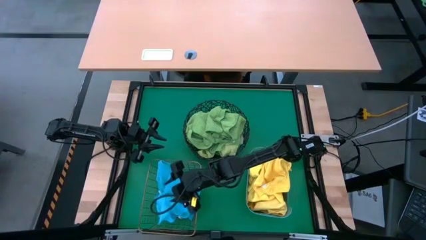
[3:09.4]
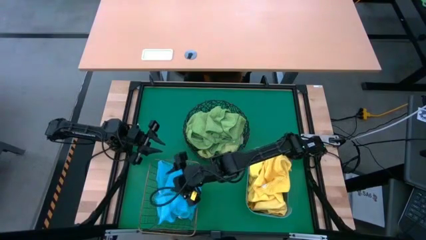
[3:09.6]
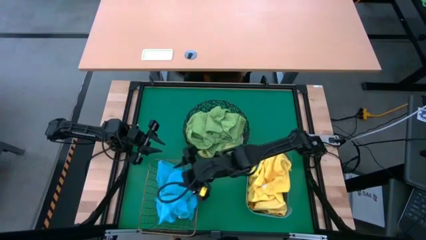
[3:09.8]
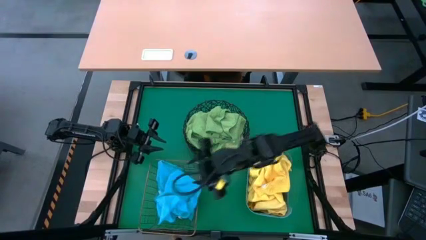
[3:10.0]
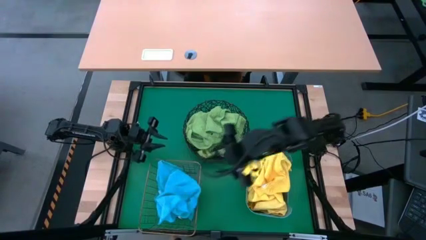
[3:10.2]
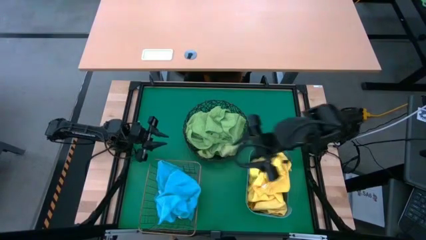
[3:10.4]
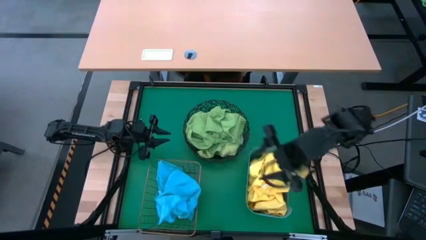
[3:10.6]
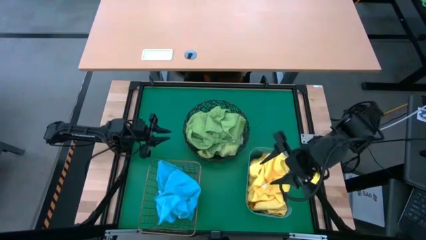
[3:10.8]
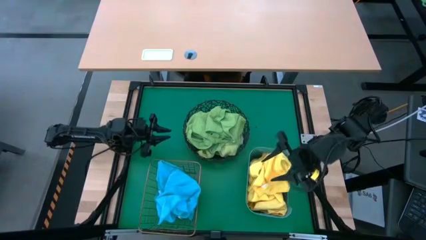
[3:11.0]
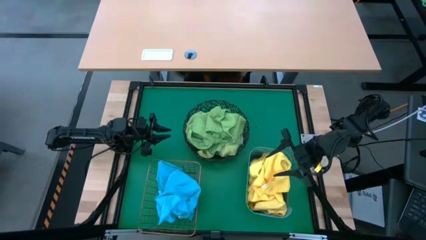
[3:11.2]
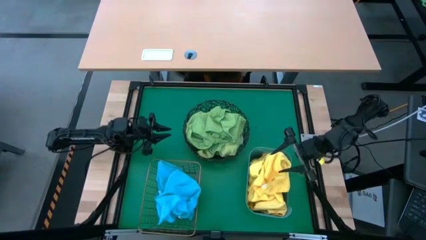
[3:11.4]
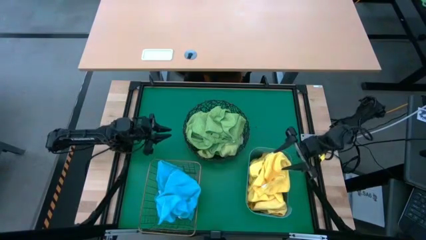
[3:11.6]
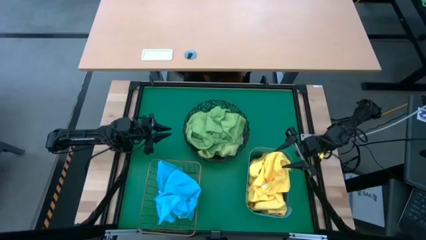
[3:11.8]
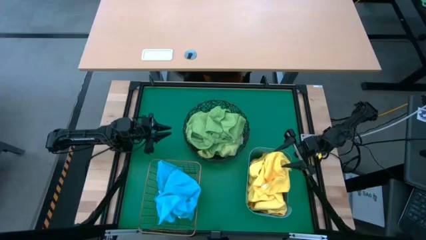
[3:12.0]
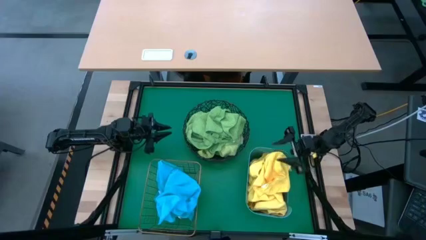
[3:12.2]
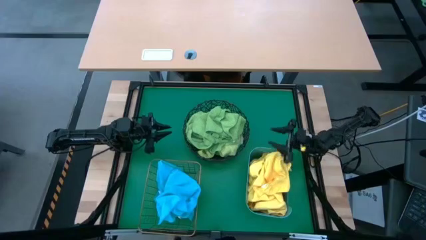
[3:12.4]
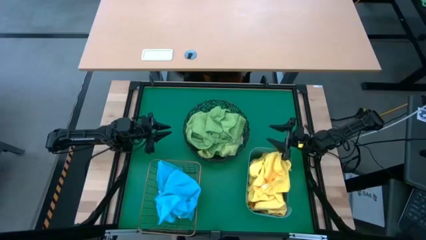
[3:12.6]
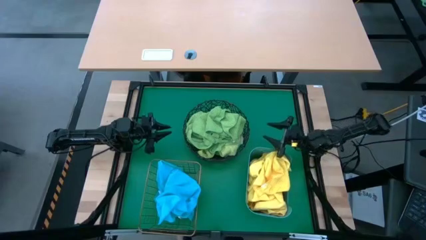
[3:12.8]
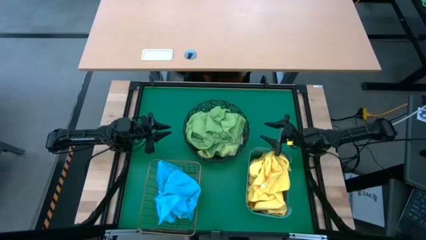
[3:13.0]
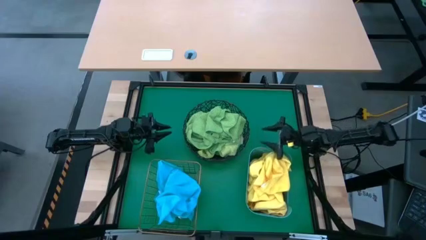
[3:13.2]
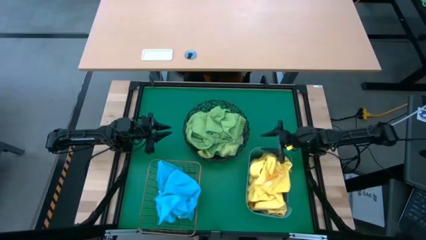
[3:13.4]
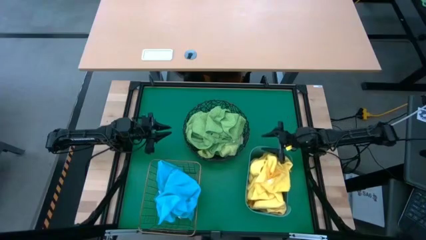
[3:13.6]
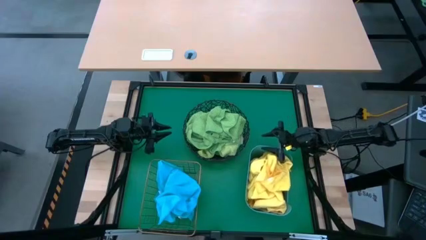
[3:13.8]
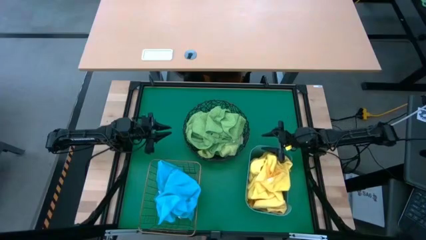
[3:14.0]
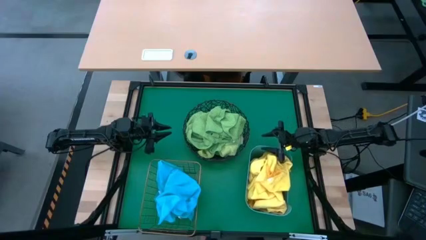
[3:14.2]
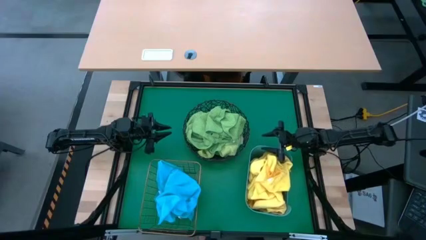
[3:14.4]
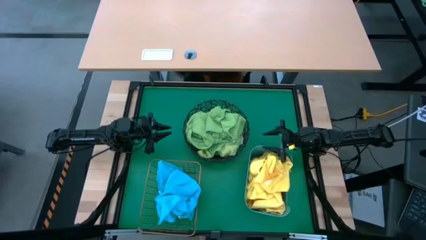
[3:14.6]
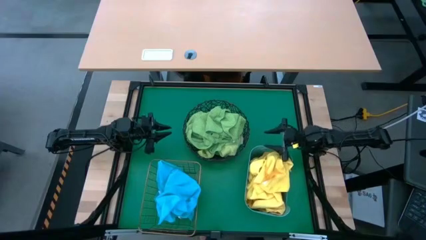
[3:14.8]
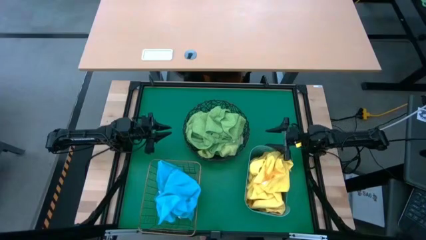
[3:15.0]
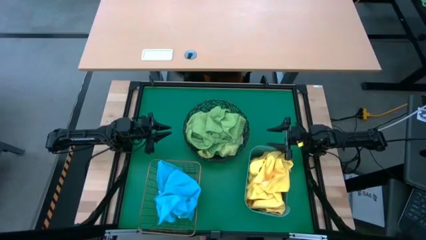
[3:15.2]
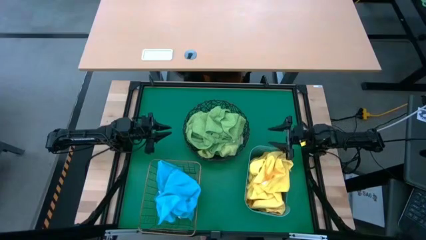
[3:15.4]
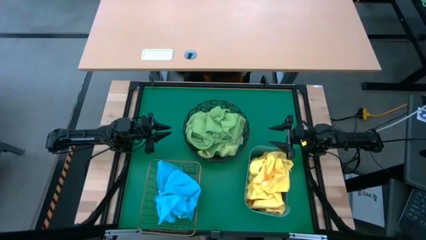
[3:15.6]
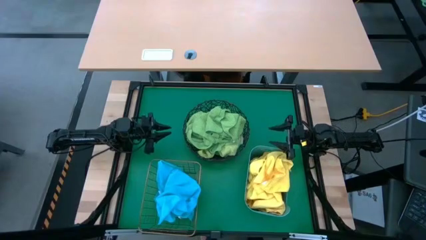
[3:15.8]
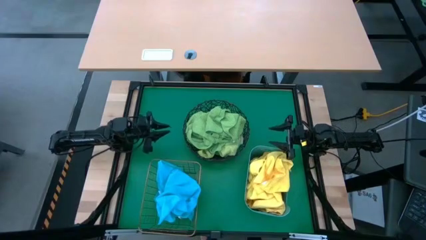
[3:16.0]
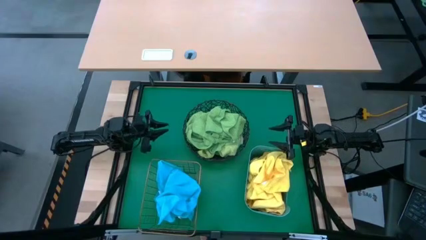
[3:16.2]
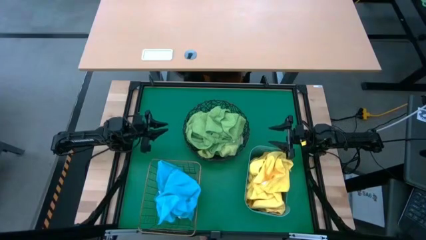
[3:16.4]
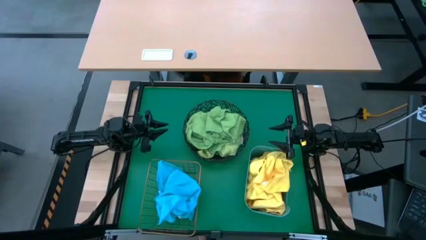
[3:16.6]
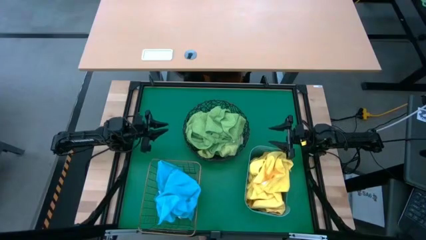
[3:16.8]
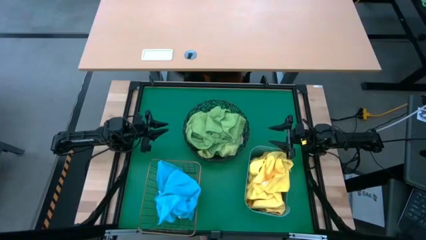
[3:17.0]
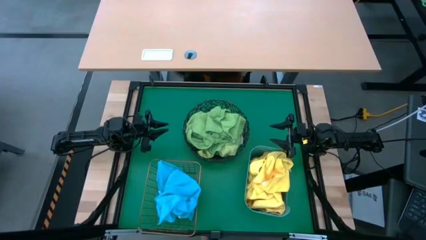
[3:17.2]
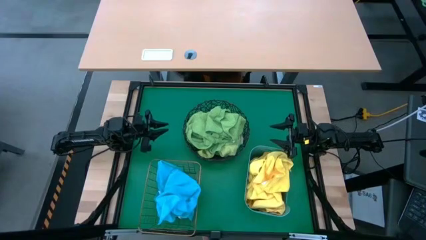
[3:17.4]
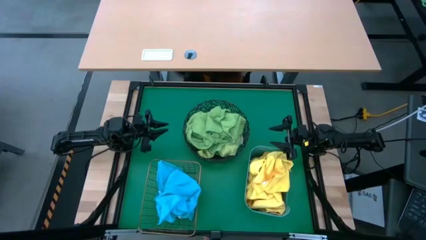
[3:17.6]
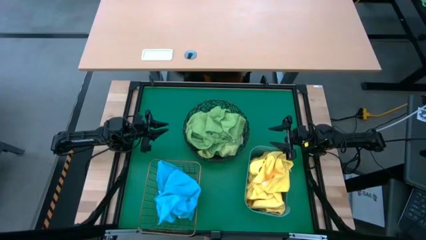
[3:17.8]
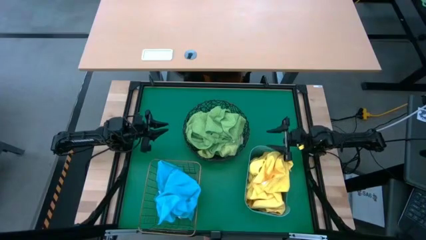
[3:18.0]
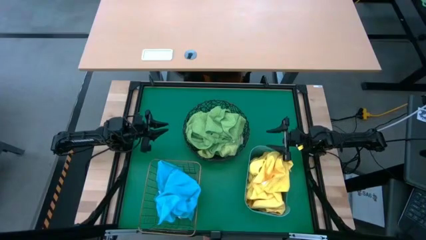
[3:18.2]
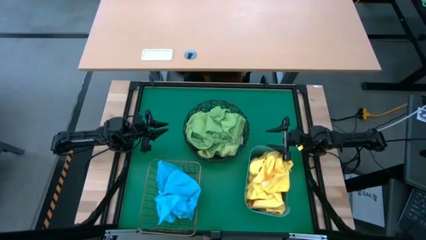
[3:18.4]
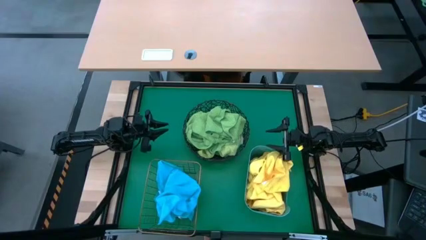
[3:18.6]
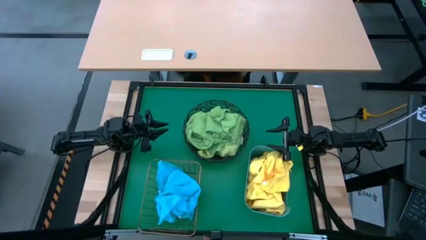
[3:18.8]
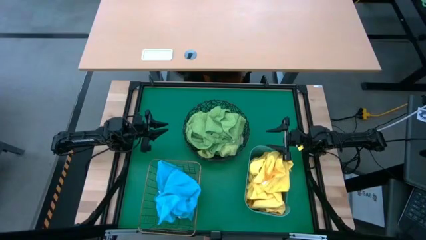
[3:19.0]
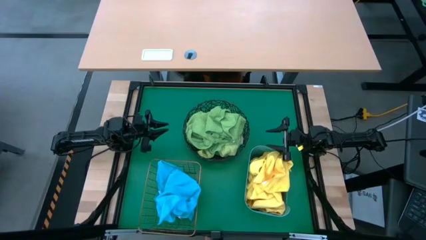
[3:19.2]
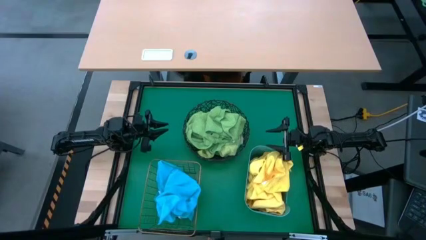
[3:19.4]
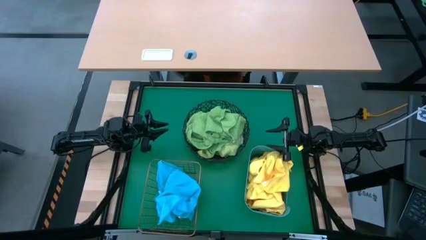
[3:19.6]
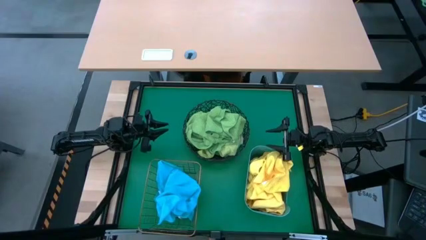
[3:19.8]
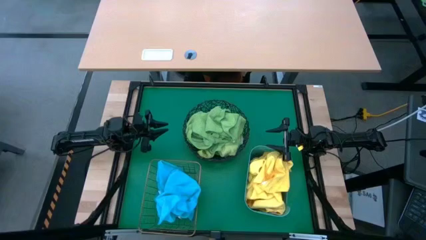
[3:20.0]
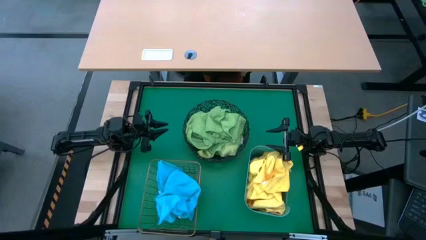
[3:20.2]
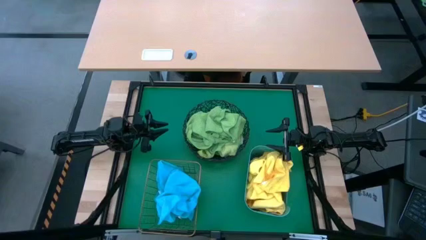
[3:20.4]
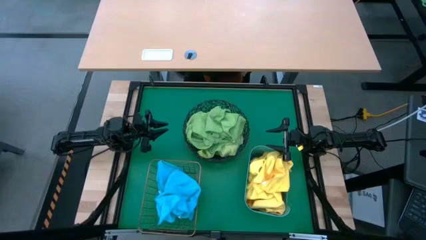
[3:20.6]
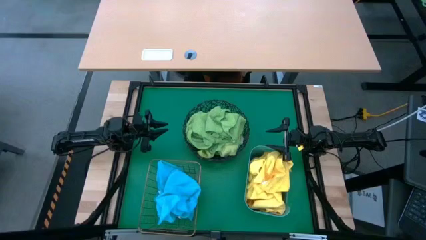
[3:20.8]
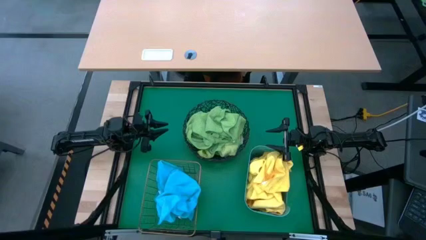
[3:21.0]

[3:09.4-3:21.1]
Task: Sort microfiber towel by color & place in baskets
Return to Home Position
